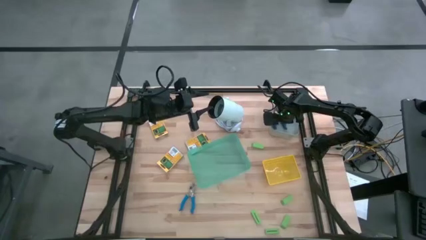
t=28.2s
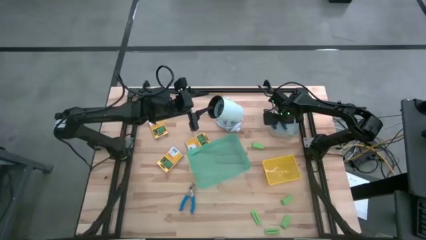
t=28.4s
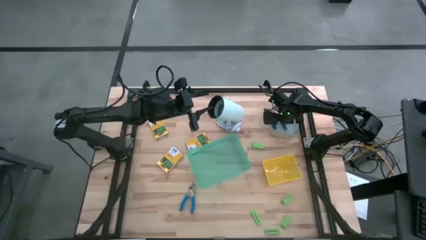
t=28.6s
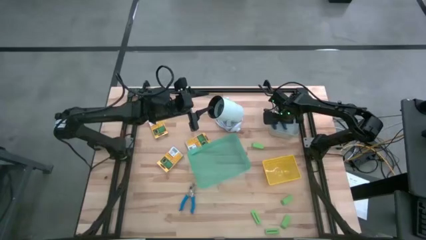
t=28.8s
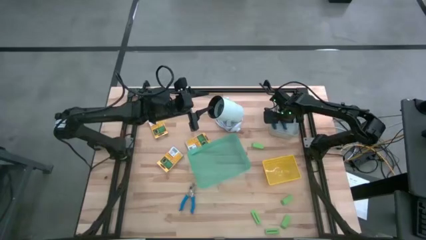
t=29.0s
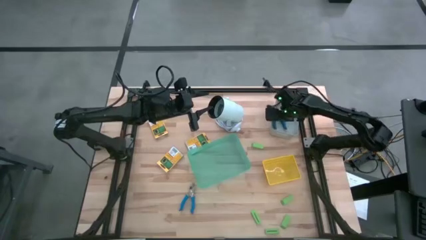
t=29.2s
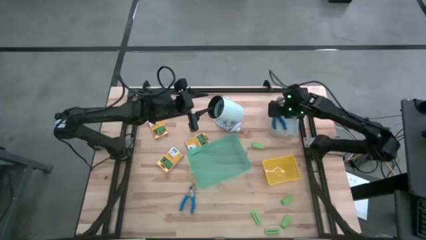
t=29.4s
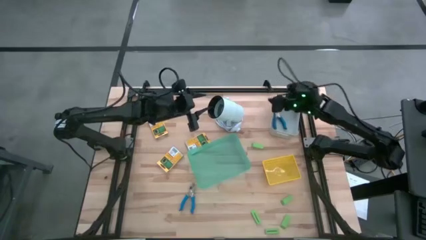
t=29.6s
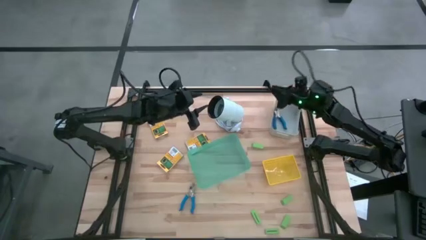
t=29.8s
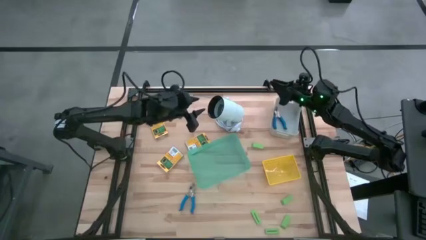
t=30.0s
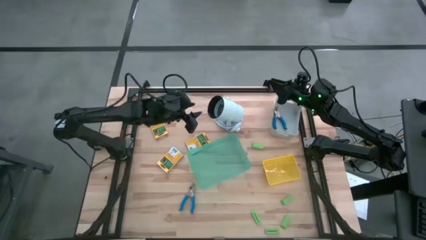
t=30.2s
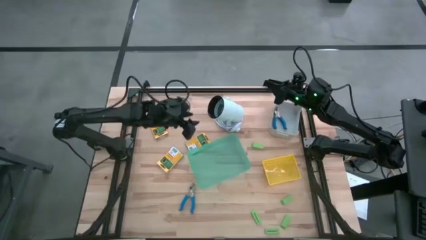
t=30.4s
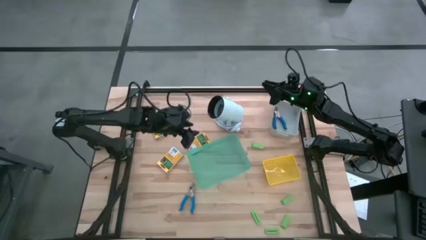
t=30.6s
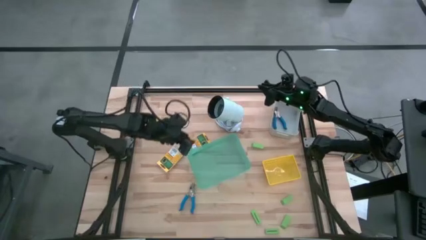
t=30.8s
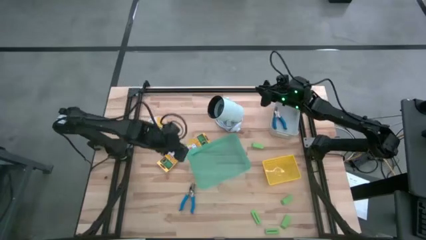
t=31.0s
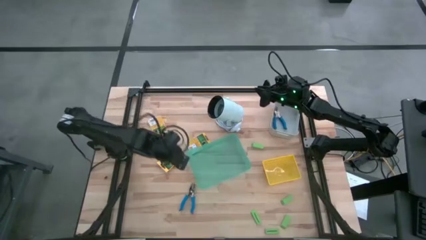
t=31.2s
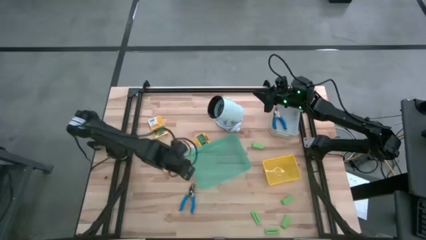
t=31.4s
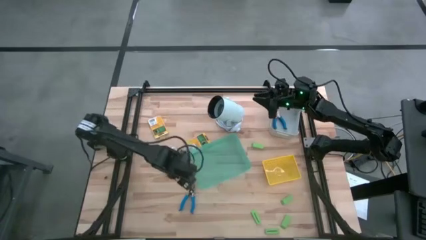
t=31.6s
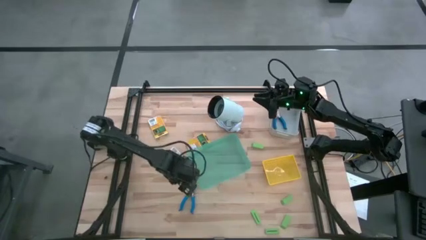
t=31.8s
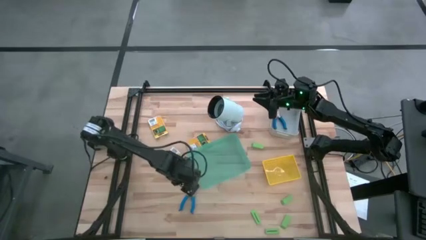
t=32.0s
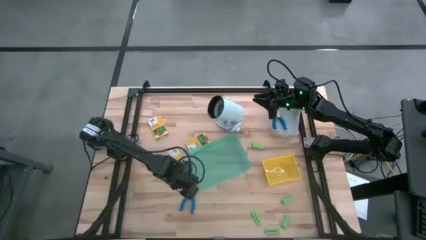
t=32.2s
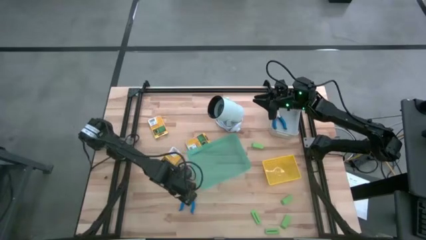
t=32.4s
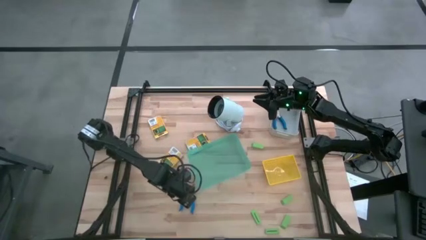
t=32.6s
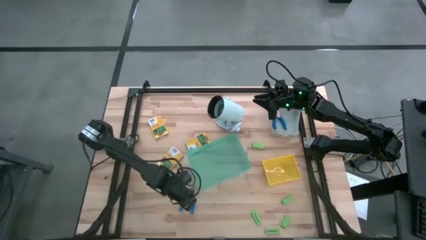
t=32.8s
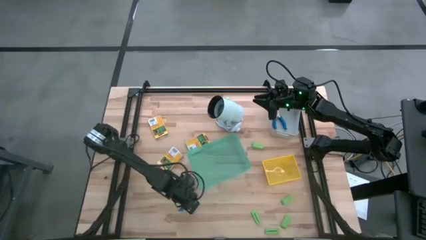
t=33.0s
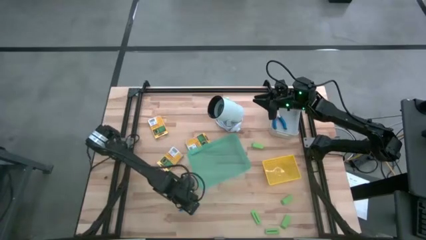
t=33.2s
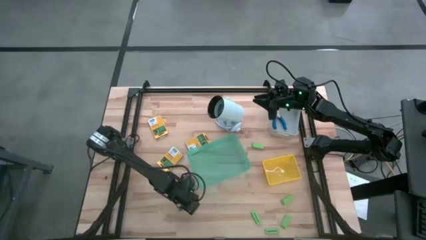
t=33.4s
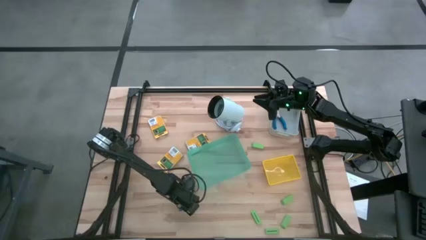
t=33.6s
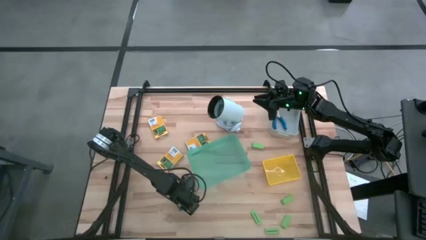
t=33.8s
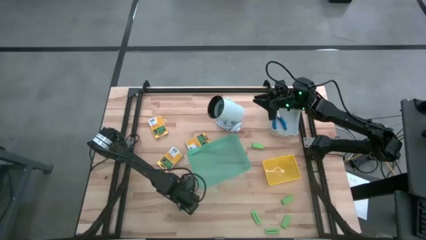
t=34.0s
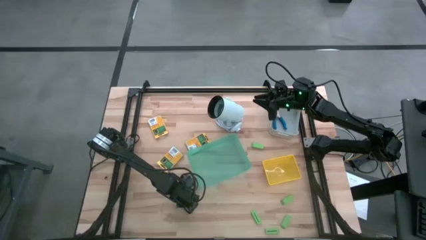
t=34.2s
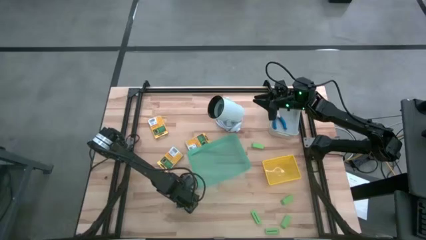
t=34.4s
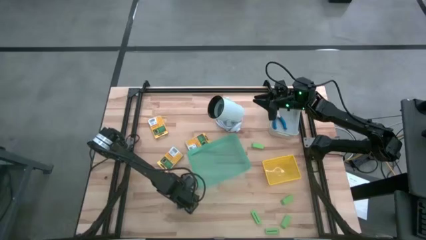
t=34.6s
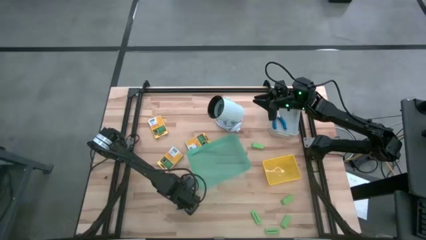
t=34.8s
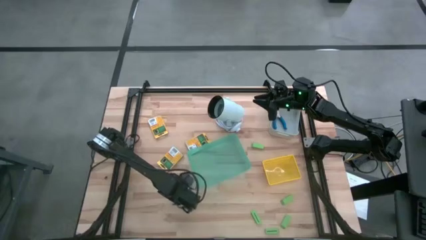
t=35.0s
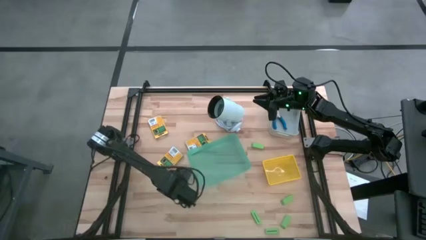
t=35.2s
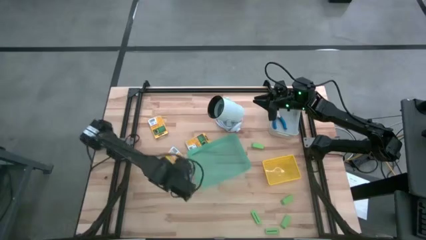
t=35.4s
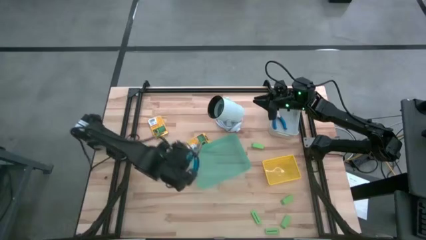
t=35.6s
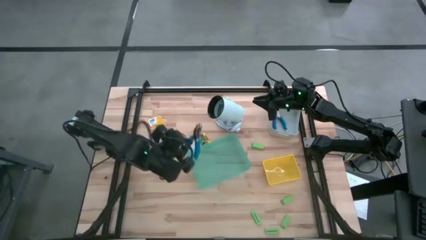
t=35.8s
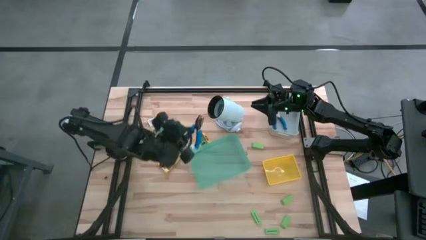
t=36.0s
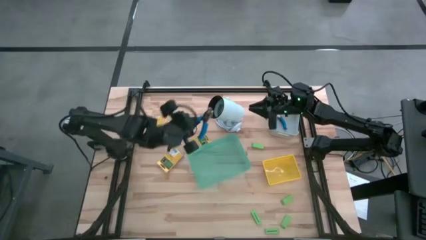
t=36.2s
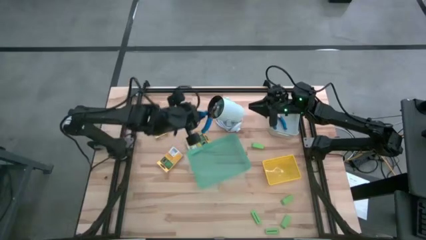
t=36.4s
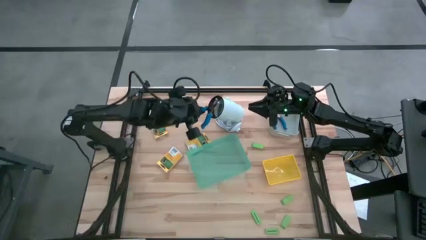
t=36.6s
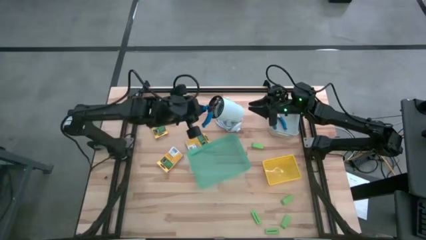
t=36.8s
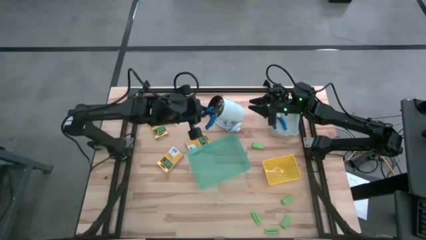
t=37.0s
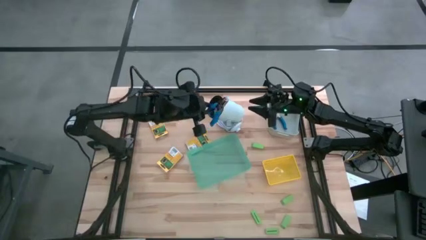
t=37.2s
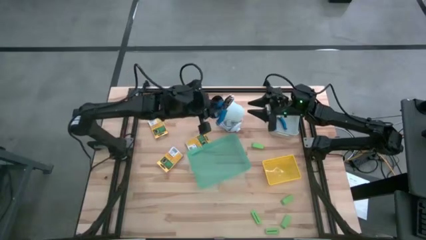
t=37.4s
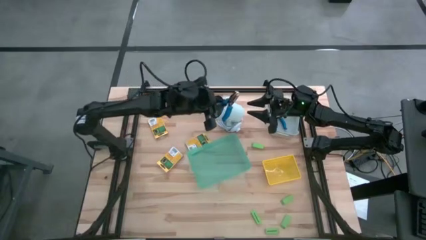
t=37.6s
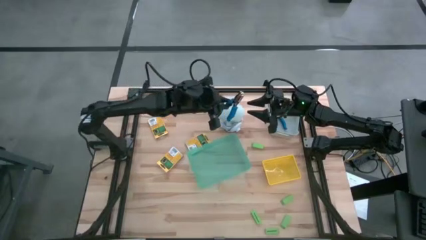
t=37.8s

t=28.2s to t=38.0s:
Task: Pick & Place School Supplies
Put the blue plier into the gray bin

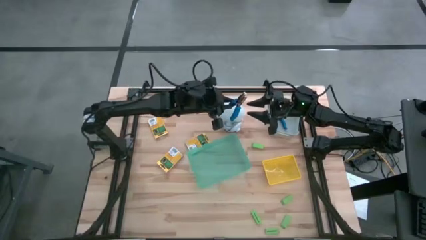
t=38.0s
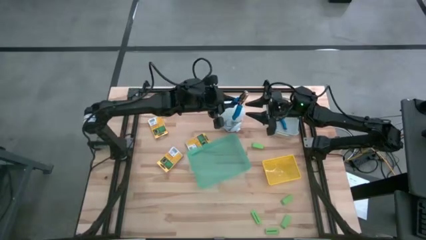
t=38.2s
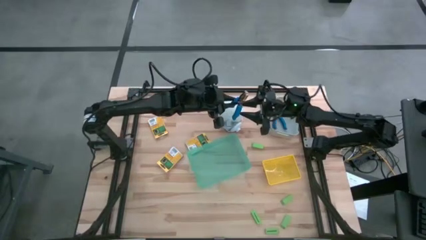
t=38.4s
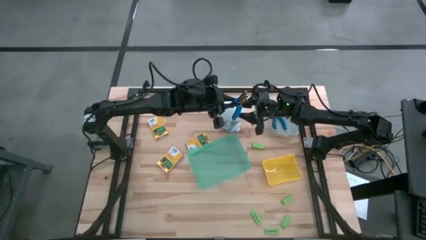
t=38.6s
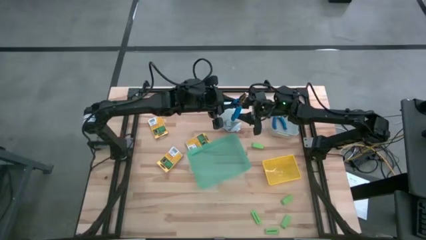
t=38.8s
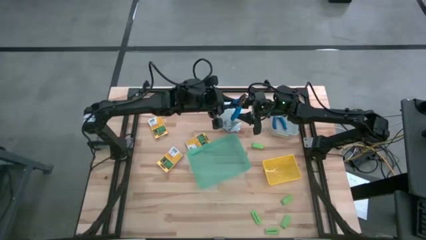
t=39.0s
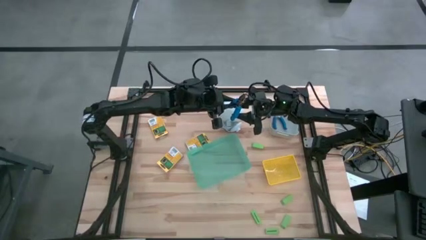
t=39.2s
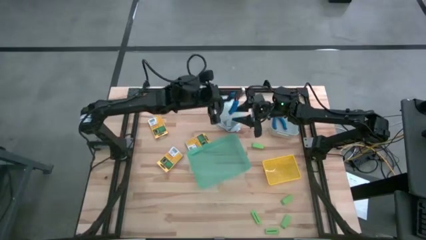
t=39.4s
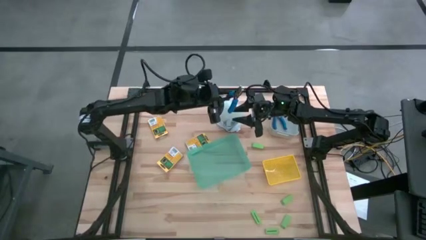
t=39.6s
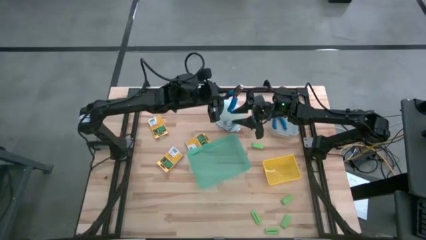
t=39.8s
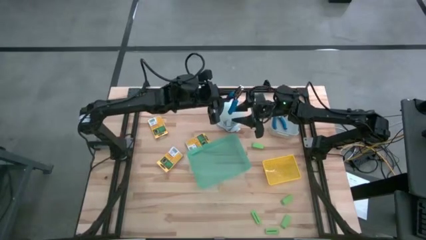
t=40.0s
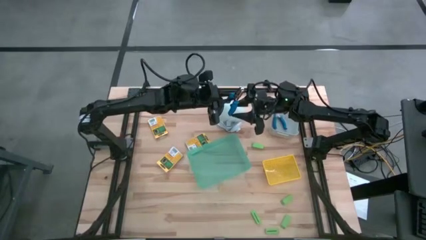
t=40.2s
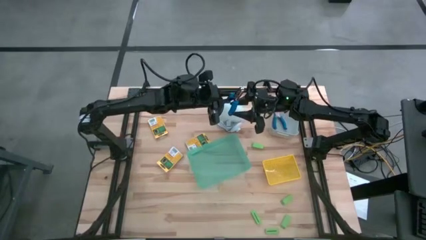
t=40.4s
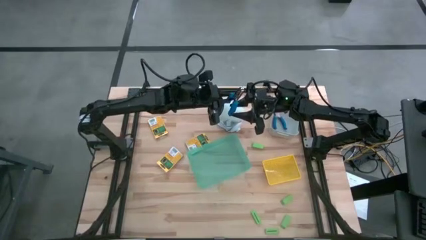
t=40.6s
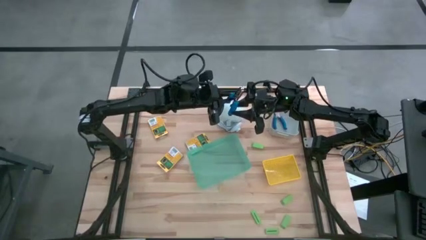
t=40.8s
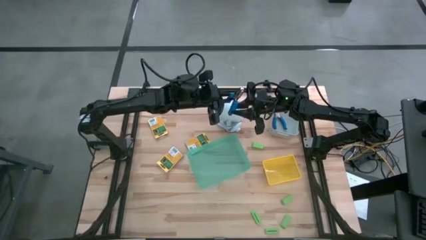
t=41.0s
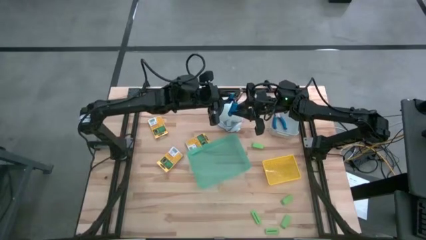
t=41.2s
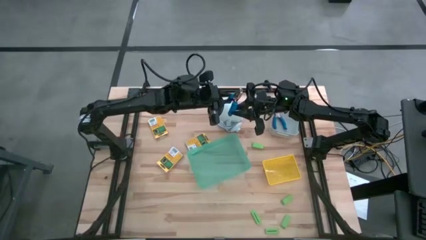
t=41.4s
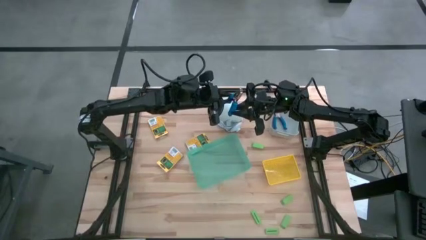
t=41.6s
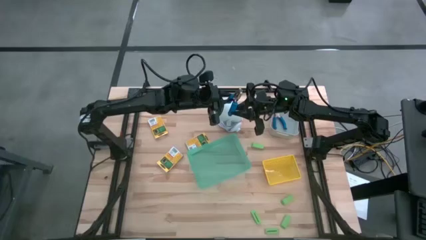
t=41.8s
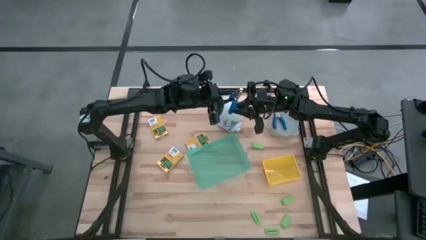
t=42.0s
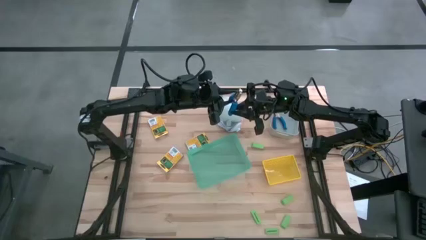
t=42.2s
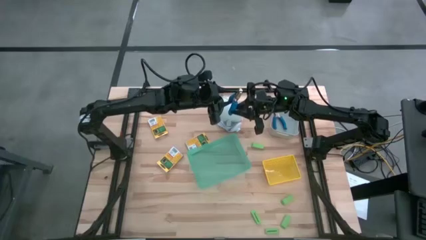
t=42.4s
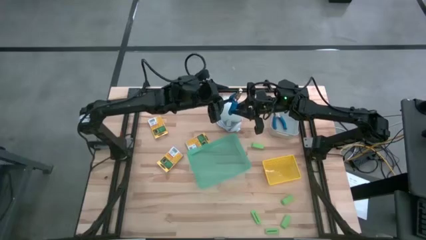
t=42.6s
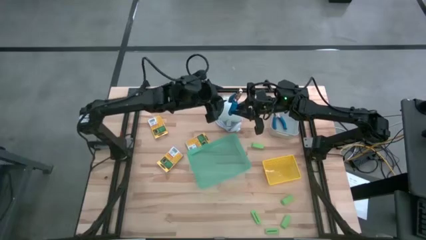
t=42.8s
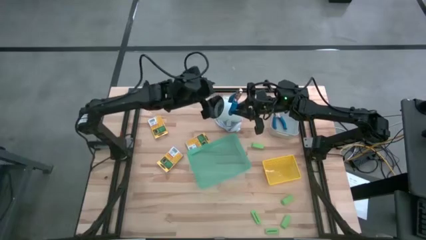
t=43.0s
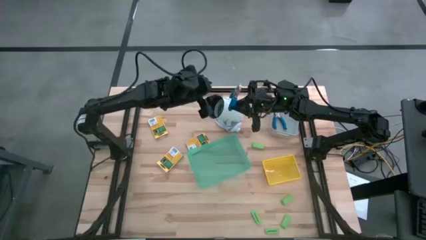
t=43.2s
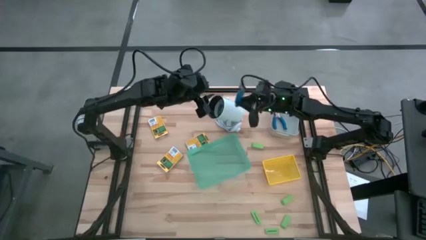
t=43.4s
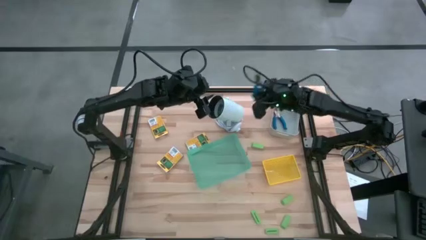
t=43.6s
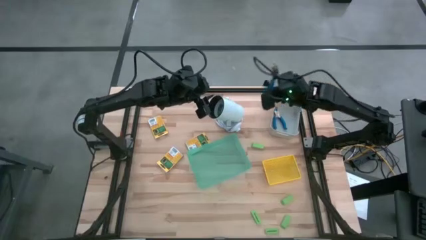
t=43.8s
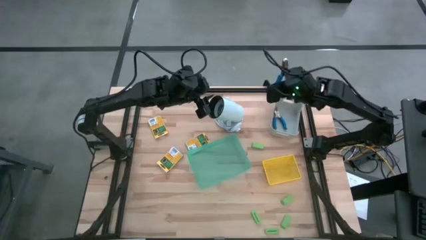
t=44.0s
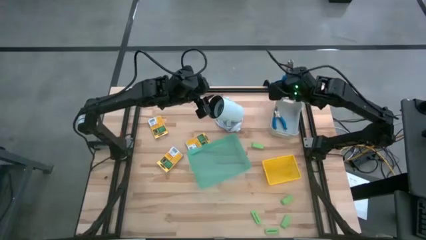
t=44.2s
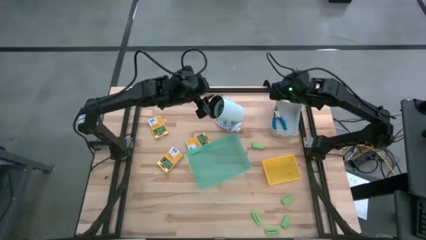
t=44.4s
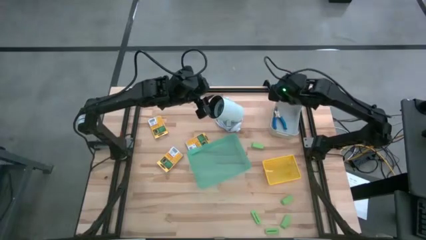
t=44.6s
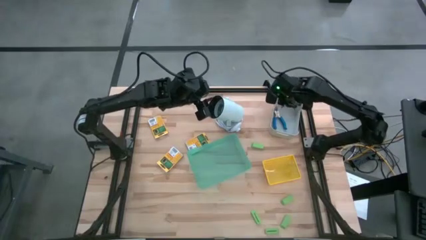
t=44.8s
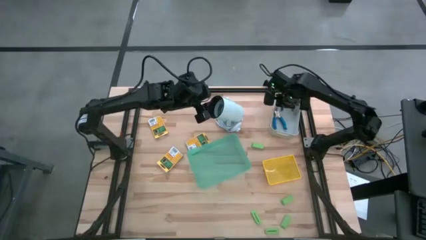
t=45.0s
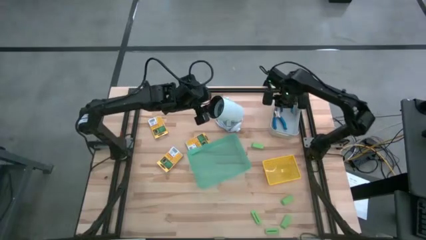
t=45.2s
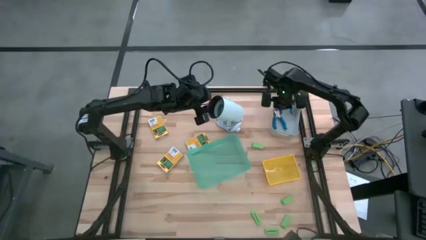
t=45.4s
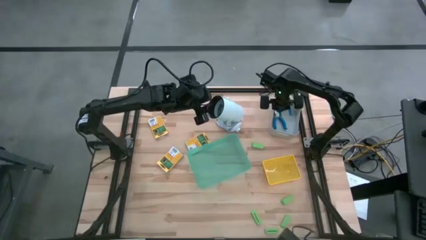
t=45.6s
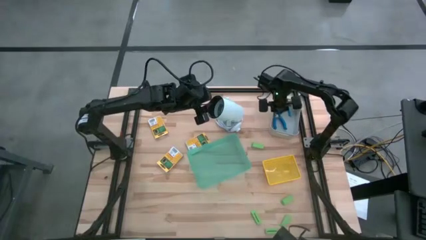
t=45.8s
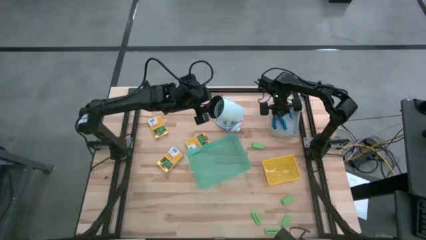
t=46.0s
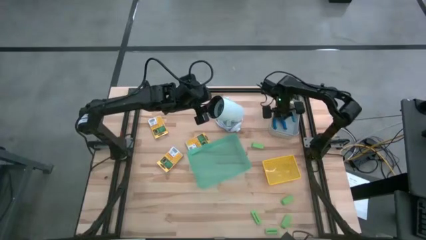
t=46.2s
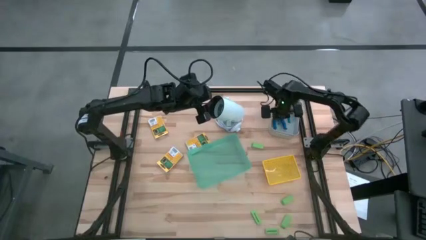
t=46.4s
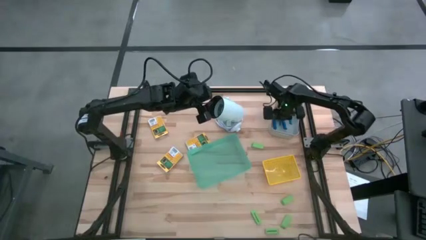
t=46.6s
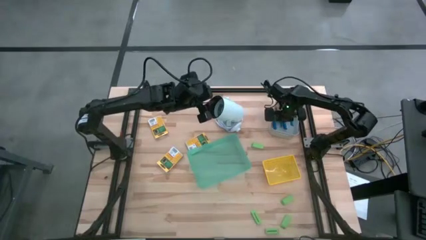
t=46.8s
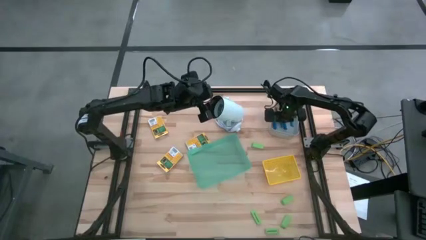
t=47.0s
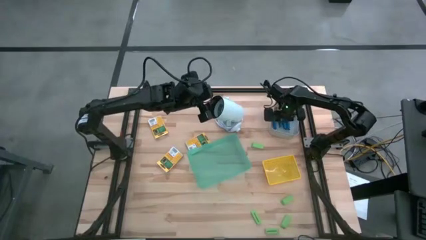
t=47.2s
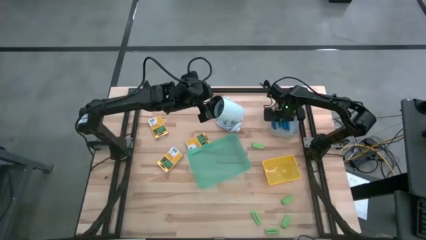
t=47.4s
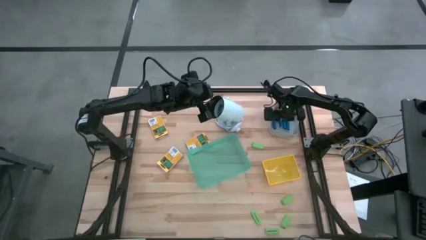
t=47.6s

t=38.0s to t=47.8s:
Put the blue plier into the gray bin
